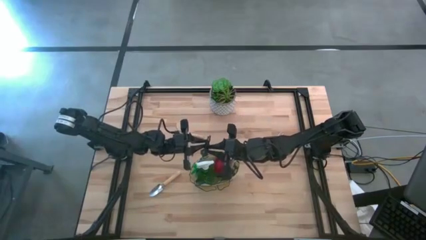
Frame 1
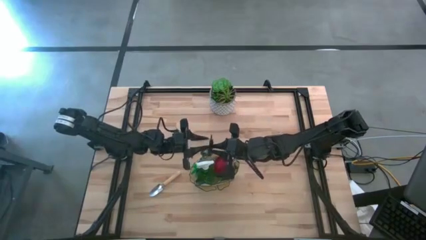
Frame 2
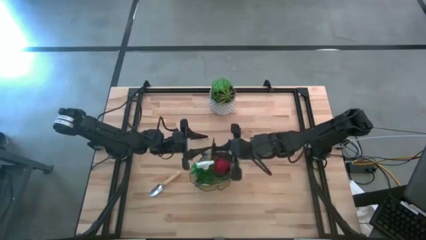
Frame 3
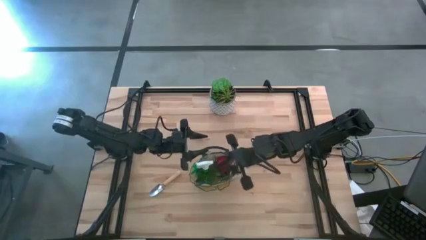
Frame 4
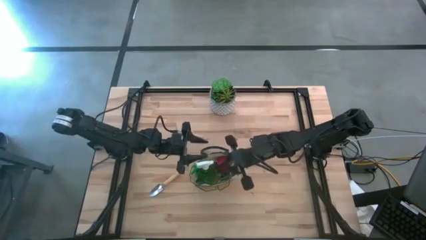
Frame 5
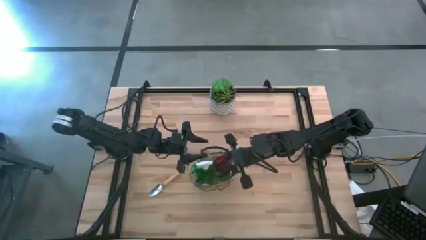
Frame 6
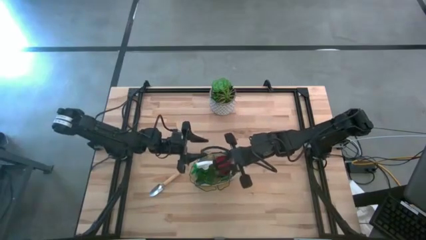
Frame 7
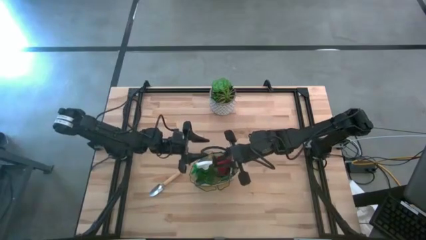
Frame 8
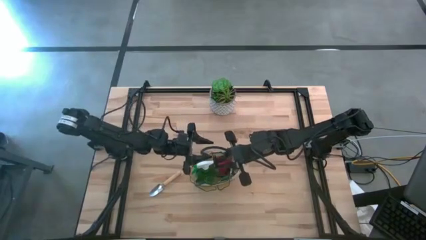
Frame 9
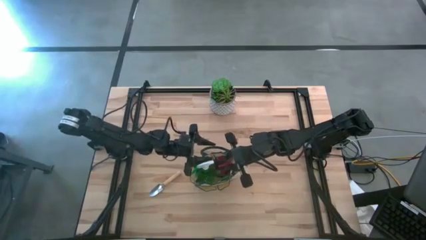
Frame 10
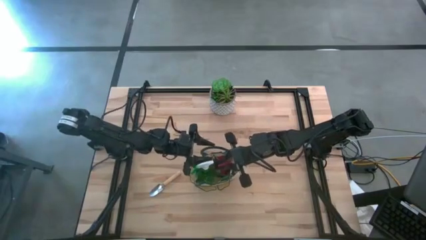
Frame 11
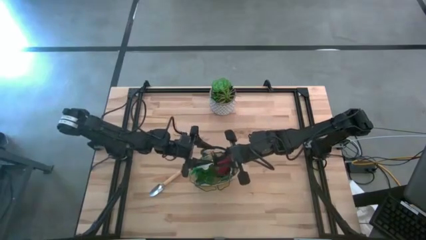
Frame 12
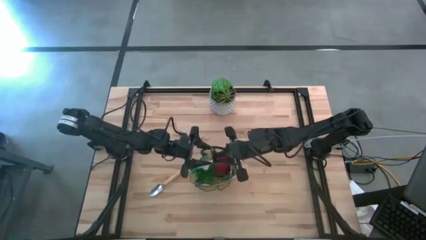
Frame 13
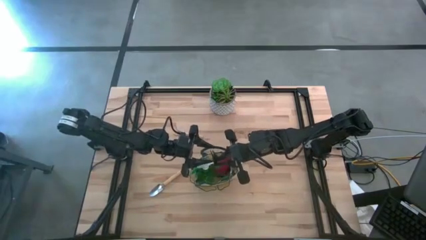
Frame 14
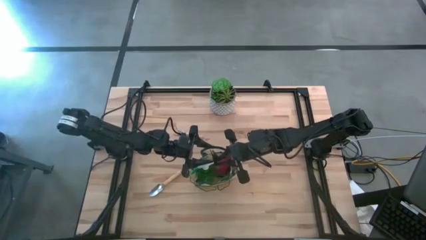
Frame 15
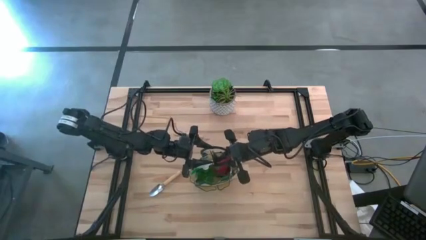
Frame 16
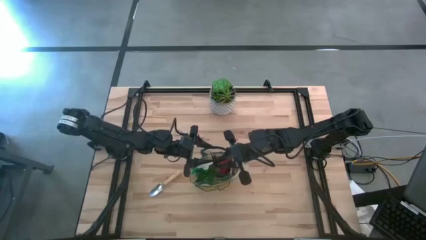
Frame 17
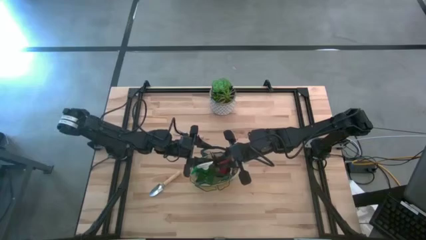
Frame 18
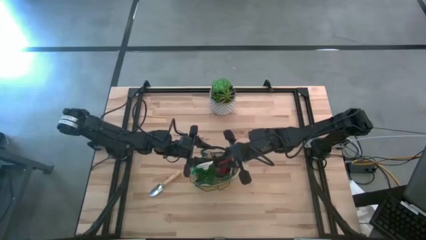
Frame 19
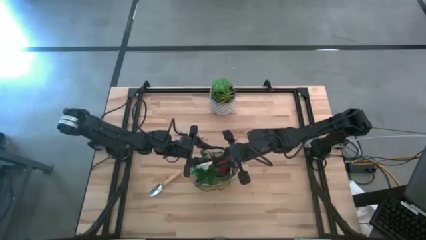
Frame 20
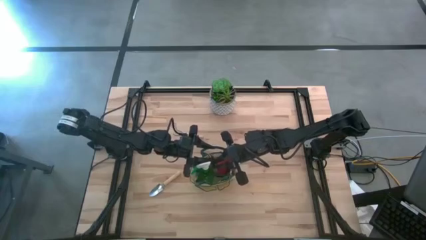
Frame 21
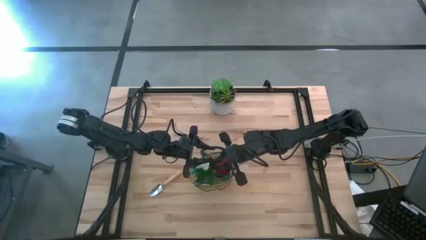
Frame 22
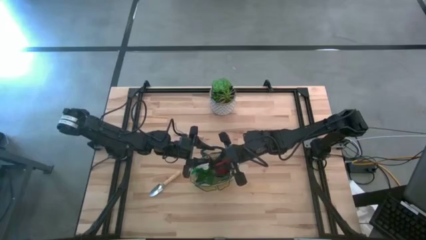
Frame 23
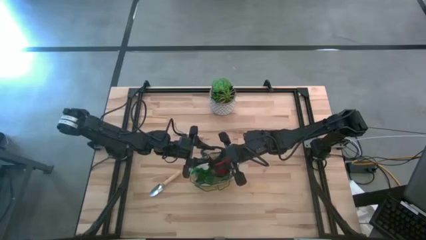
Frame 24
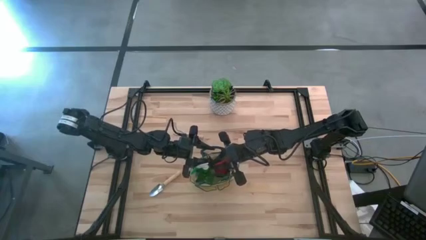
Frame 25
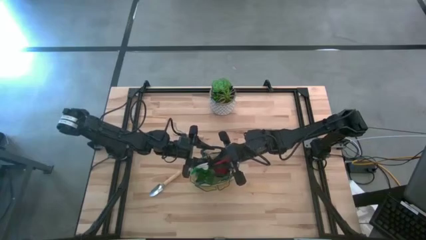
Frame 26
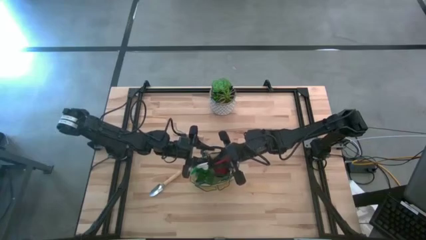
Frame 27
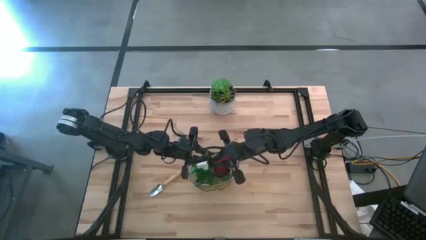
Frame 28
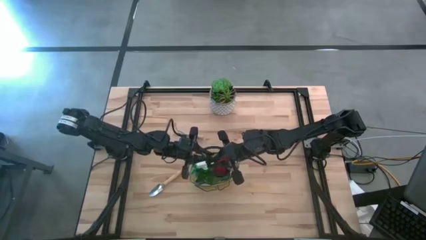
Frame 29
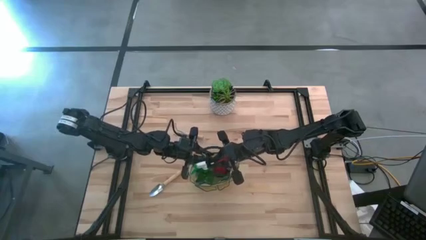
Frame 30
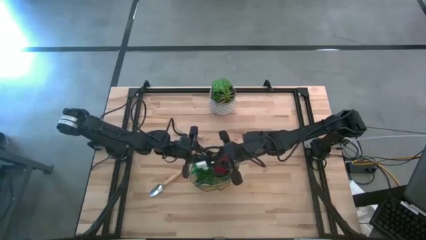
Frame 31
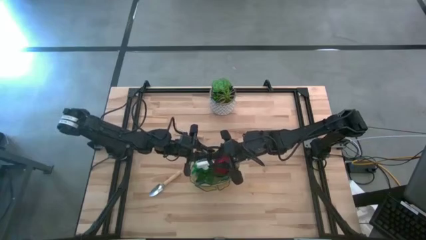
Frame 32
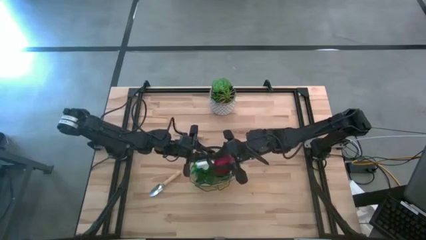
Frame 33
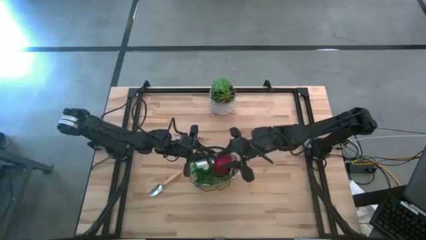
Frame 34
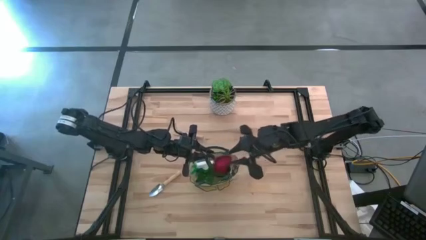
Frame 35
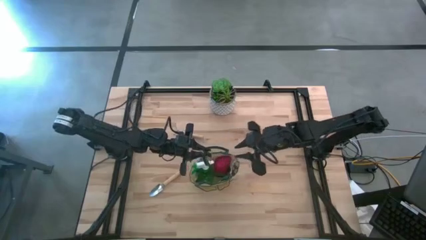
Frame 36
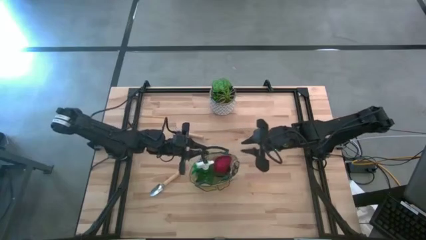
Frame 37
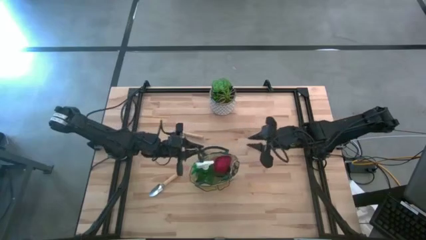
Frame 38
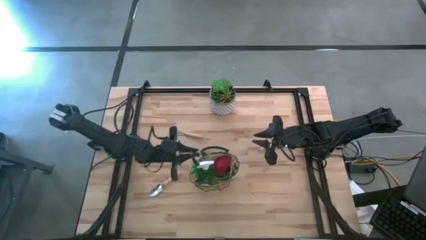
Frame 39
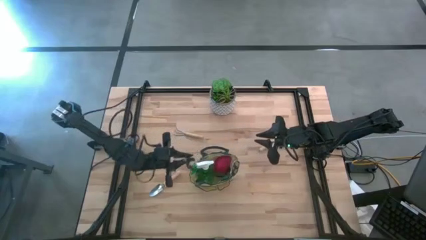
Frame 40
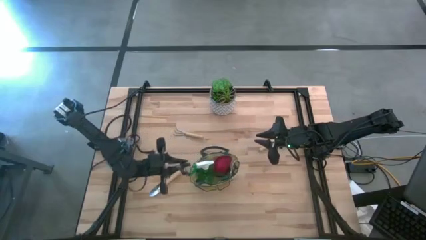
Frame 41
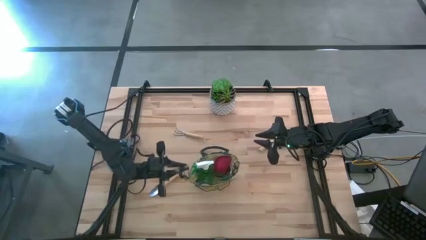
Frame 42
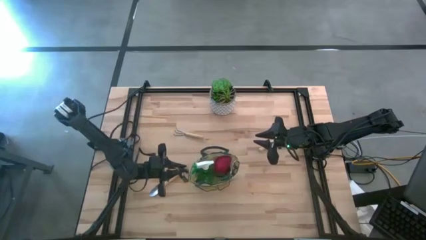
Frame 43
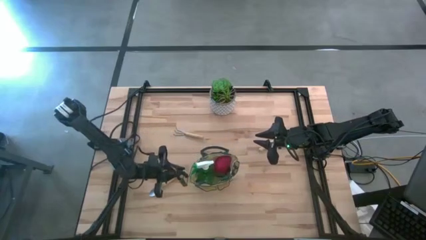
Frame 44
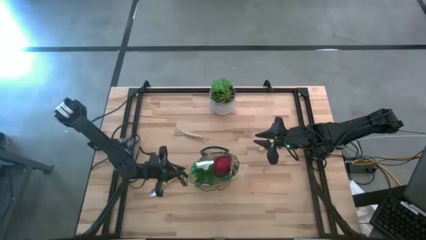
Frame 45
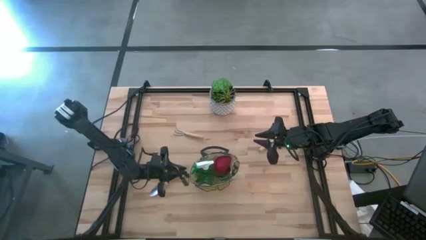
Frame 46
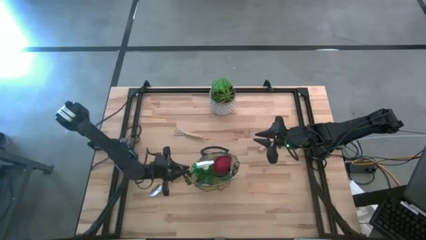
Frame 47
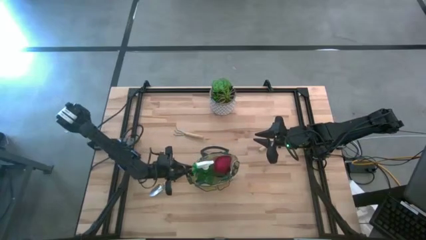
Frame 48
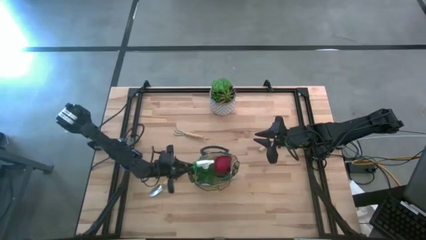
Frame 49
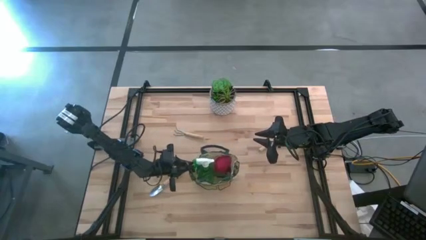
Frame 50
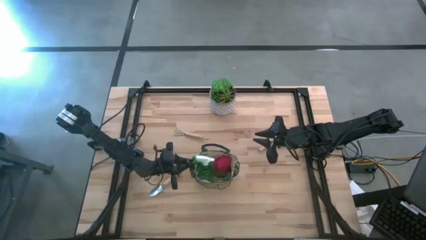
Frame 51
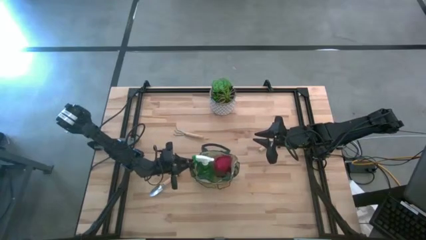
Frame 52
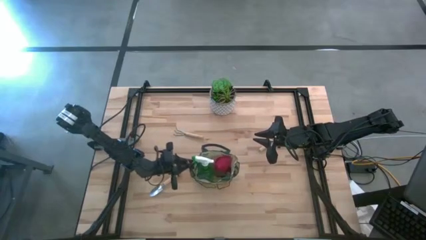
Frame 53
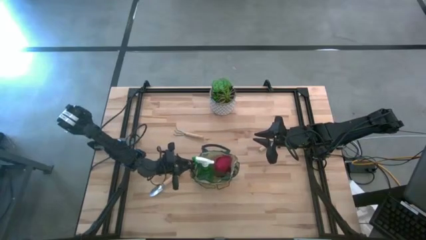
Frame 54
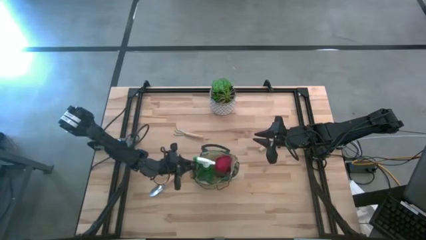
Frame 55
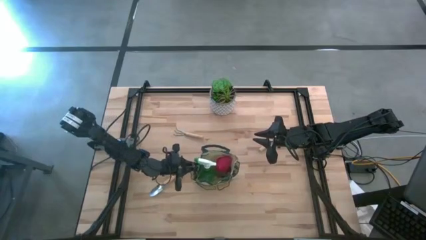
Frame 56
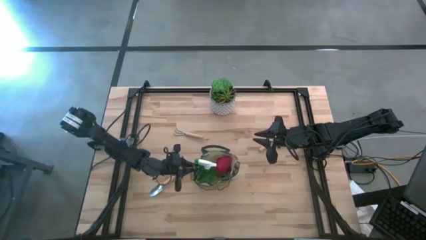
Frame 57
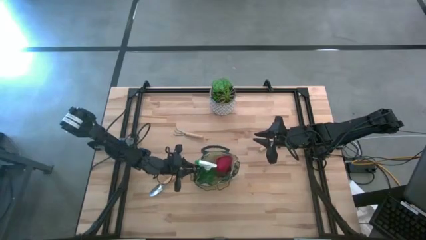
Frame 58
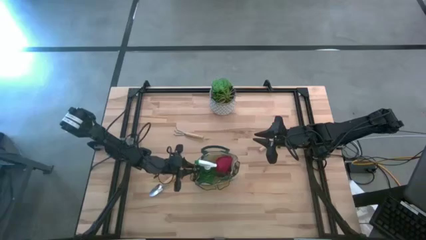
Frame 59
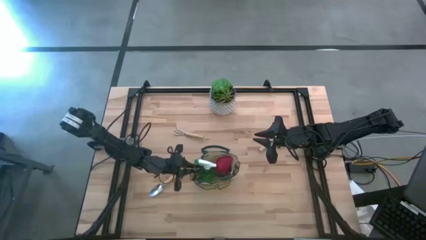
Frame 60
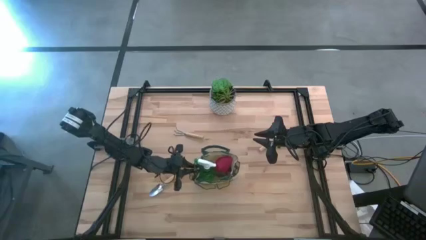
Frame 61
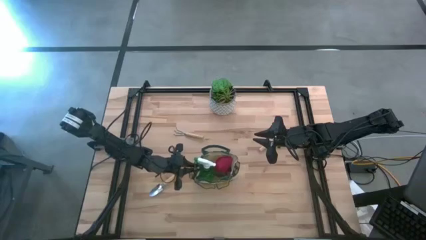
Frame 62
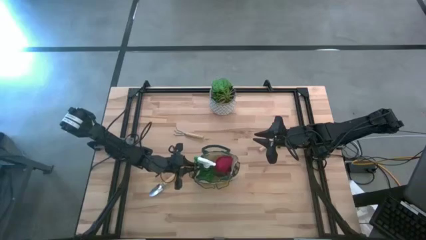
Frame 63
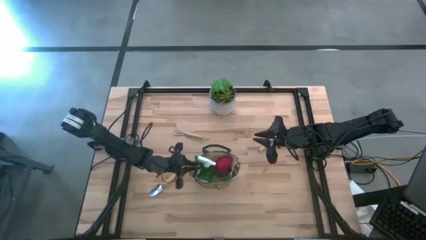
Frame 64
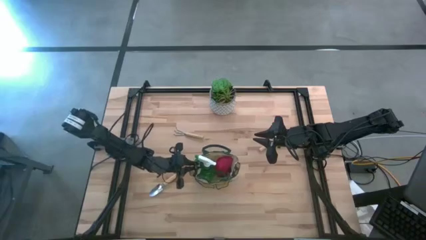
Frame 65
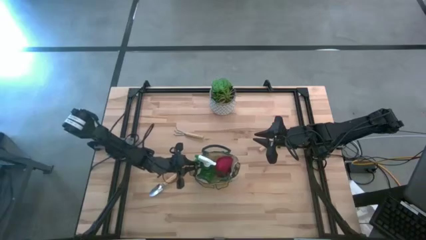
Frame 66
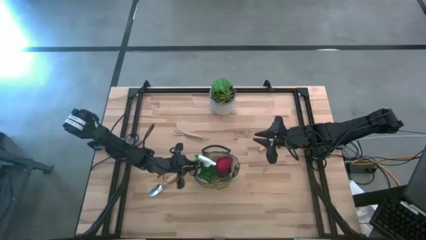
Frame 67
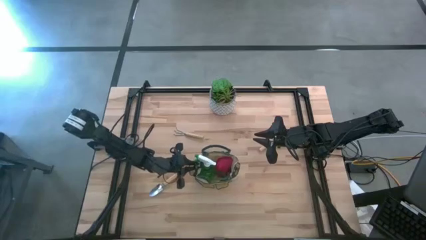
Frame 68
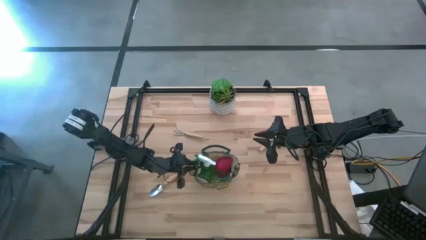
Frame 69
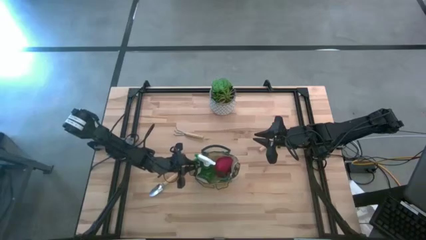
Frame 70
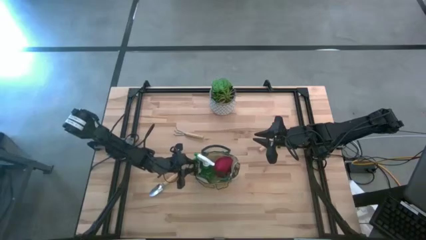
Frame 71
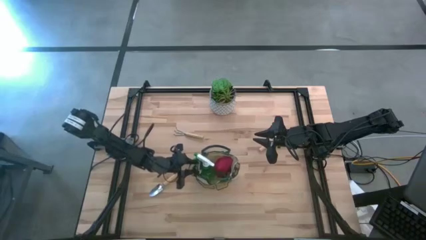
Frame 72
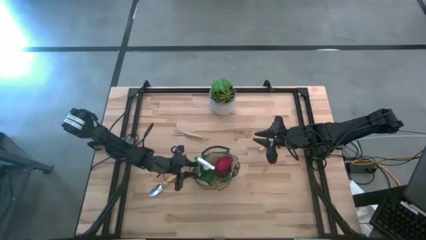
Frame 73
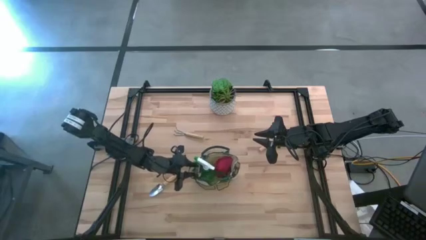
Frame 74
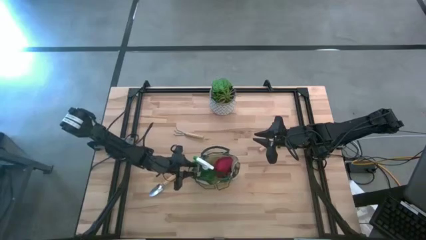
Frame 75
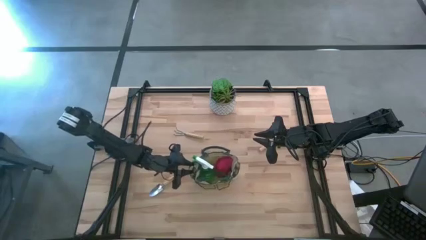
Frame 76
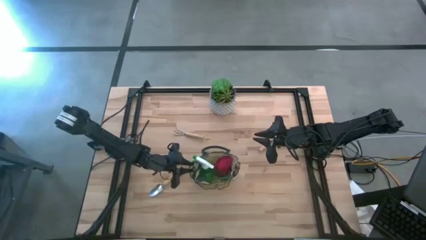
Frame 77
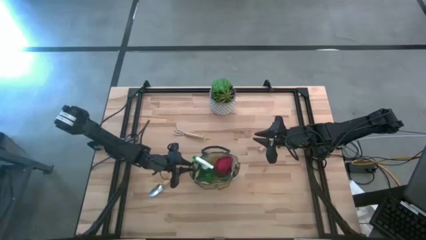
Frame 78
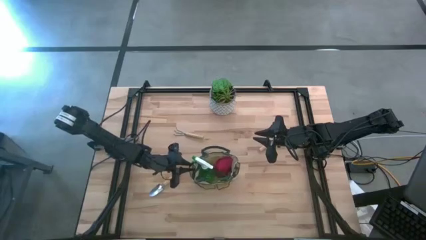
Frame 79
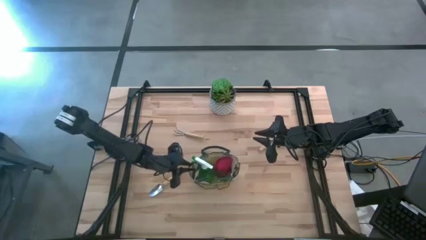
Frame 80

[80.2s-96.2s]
Task: Pick & Place Garden tools in Gardening bag
Put the green shear scissors into the white gardening bag

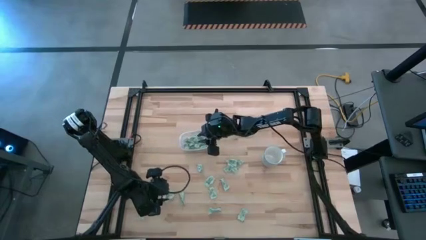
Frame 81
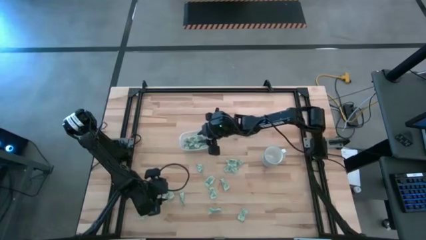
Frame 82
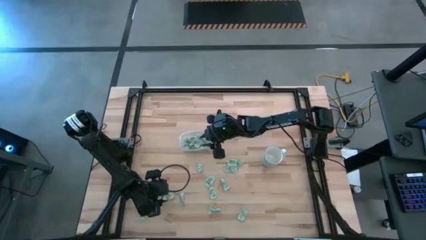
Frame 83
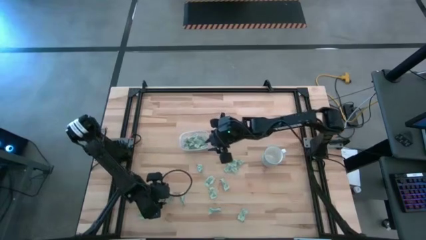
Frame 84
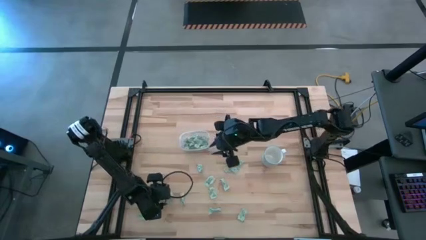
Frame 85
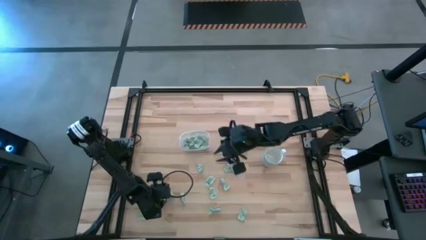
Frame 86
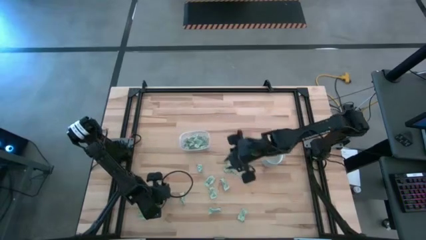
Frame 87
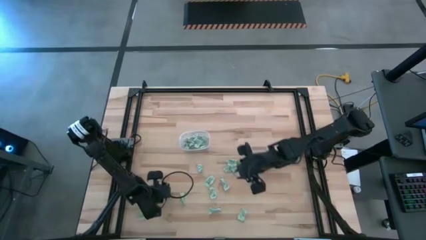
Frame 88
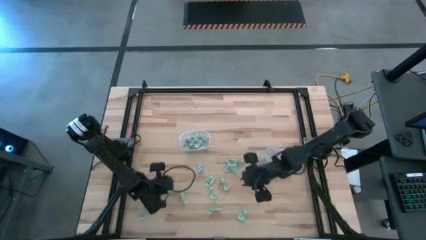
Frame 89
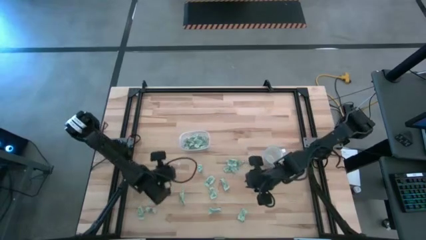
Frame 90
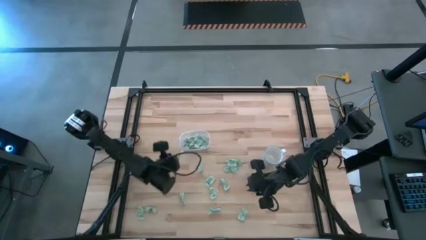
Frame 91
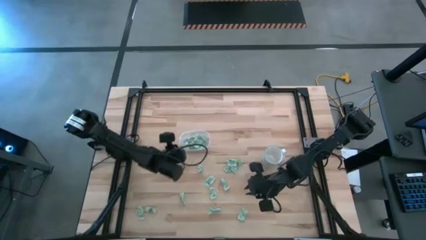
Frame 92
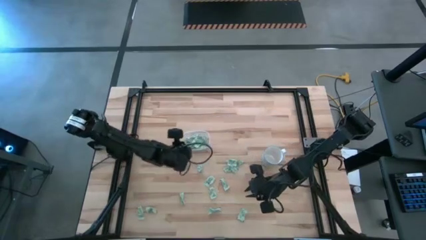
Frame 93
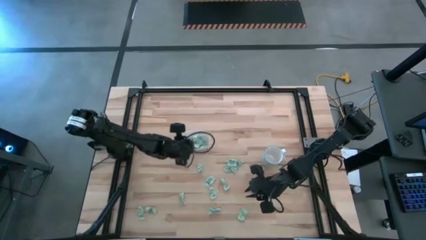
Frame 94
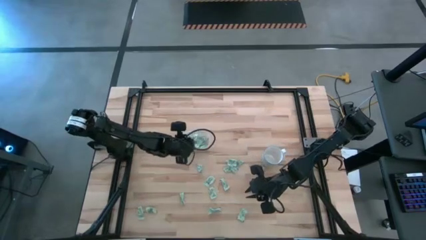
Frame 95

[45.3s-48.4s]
Task: Pick and place Stevia / Truvia into bins
Put the stevia packet into the transparent bin
